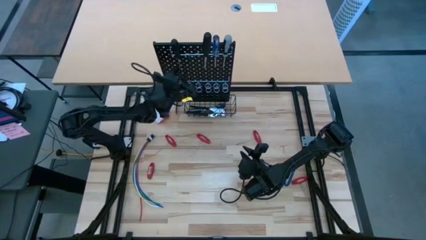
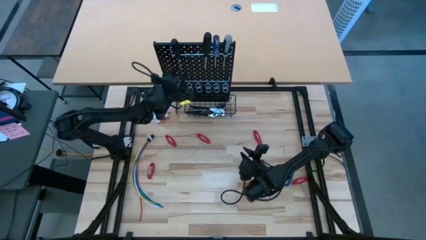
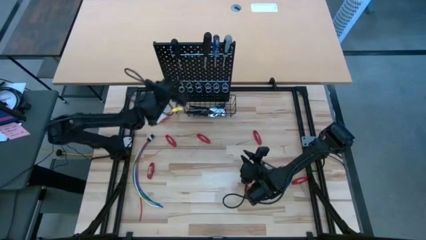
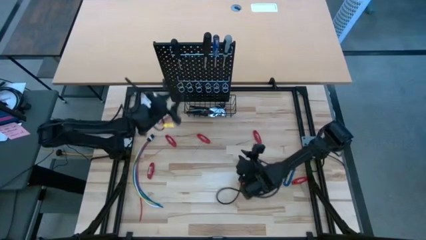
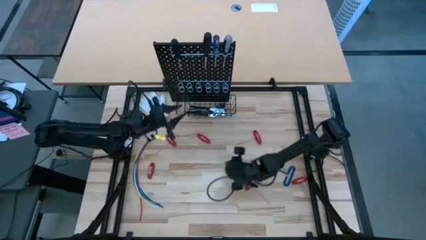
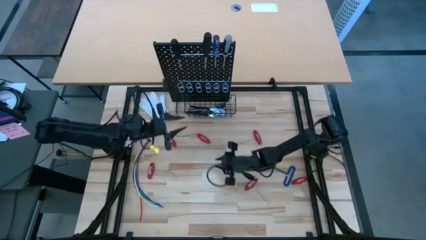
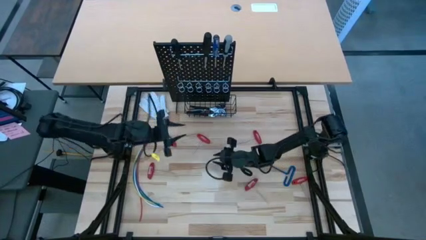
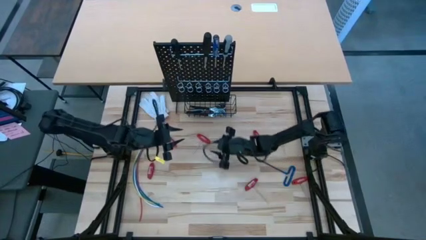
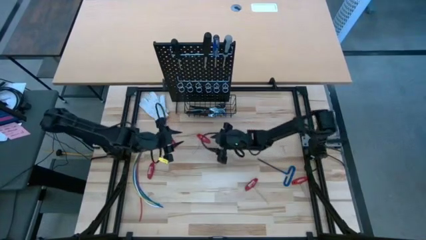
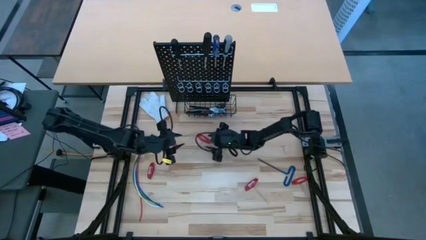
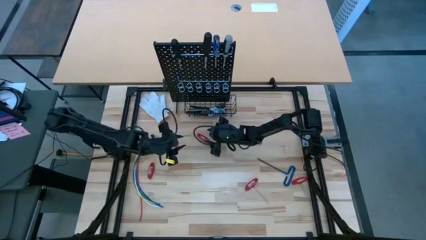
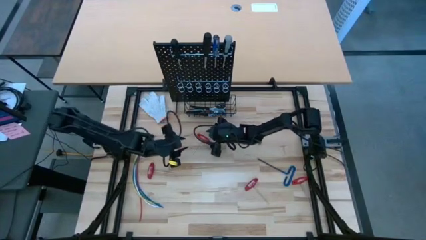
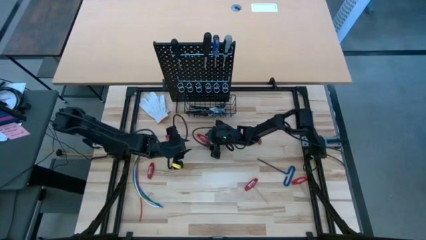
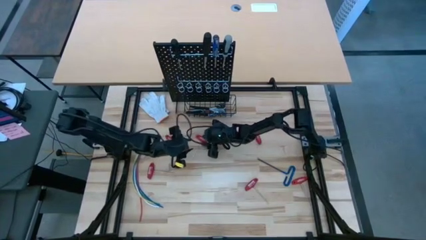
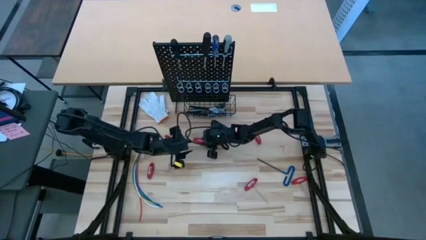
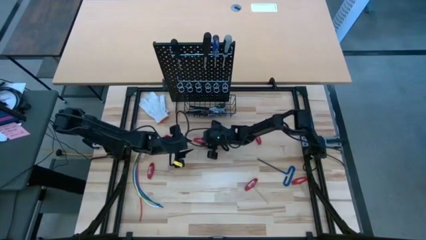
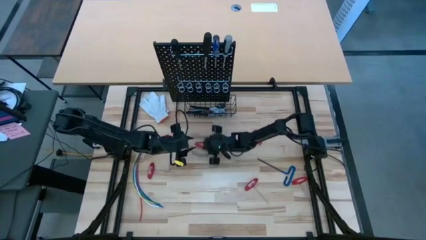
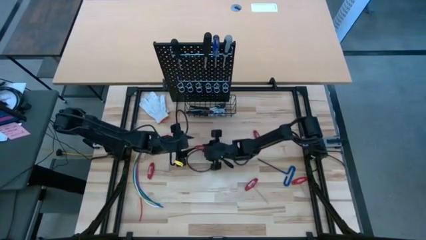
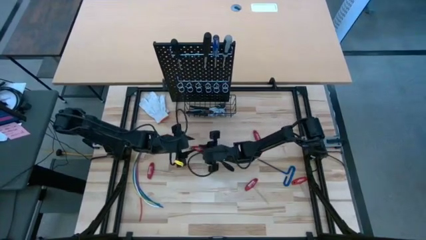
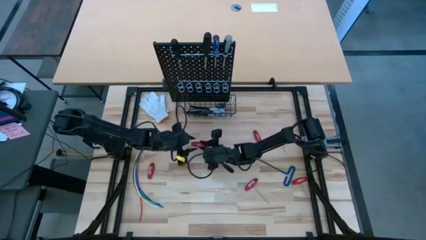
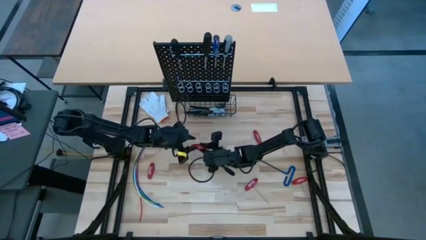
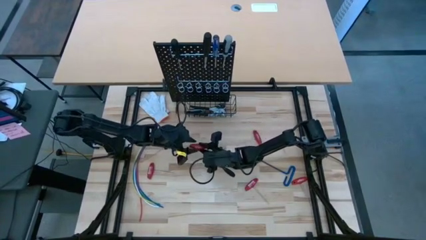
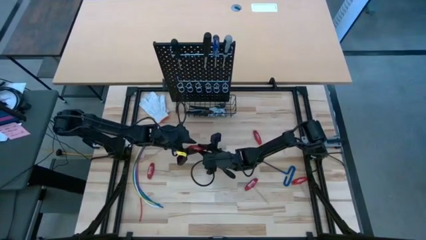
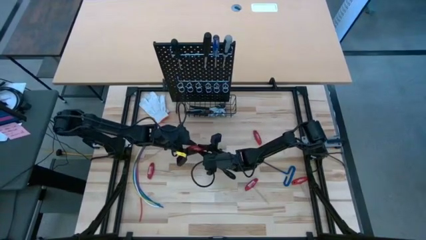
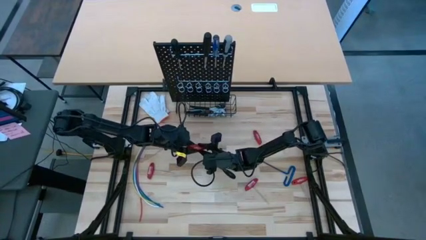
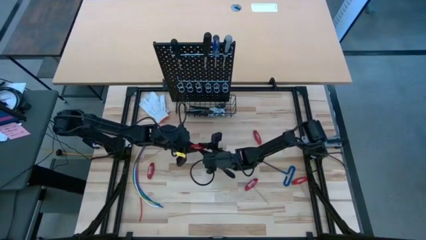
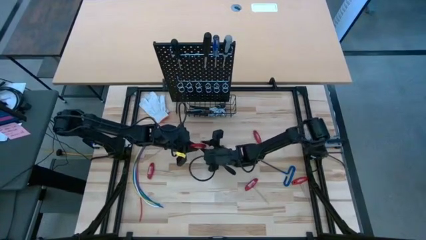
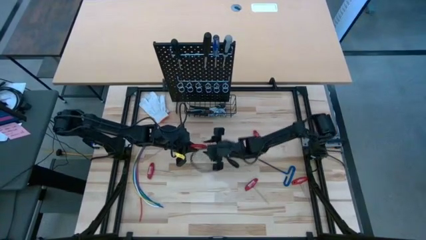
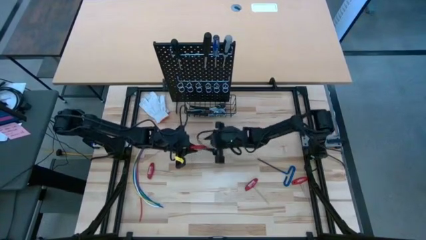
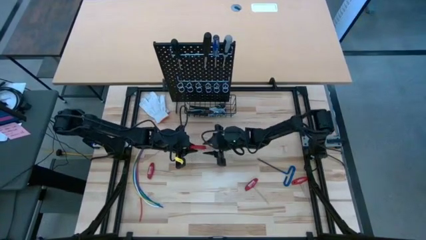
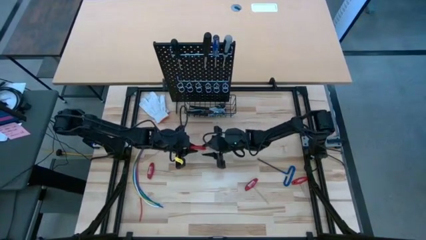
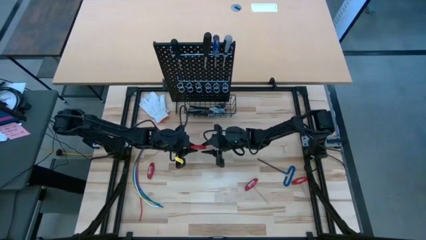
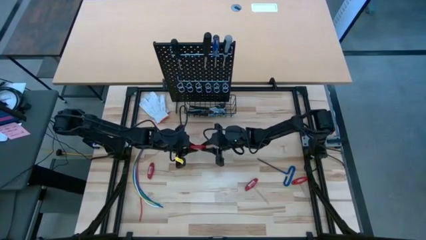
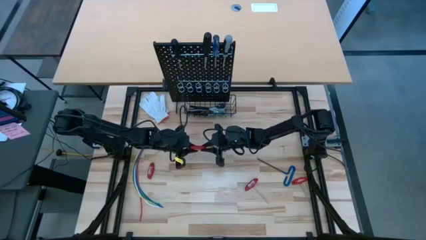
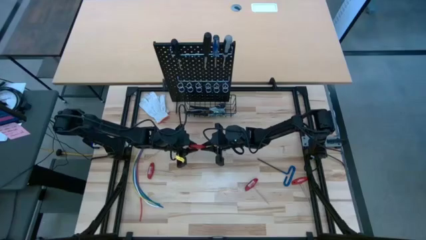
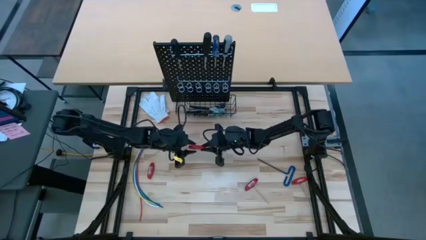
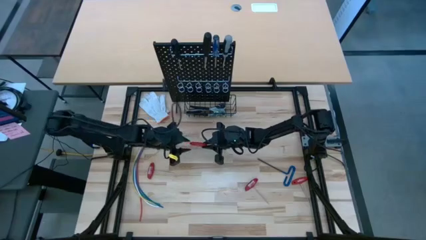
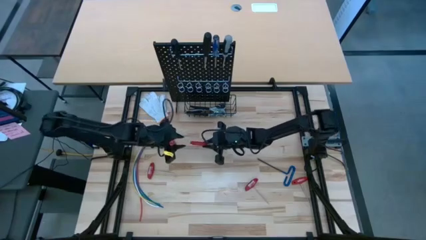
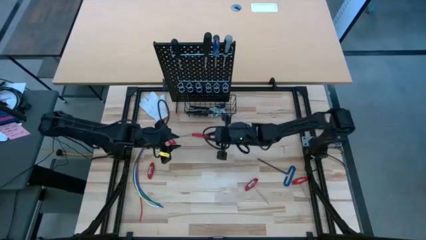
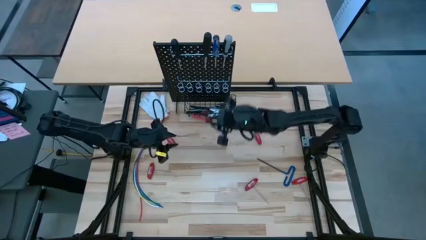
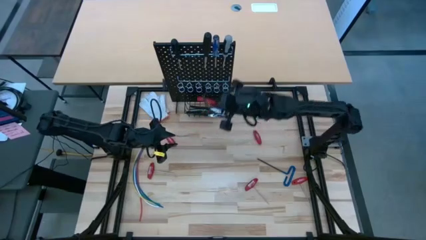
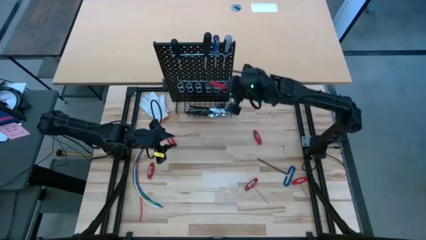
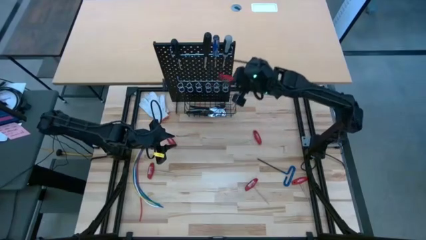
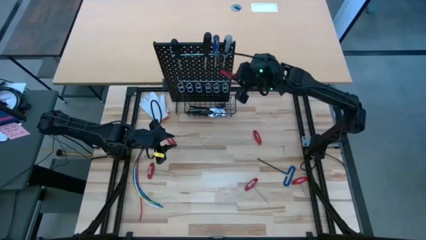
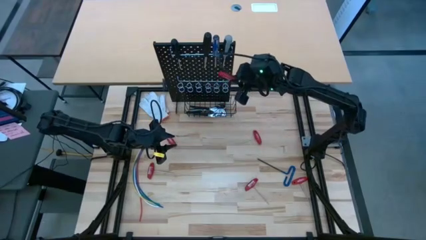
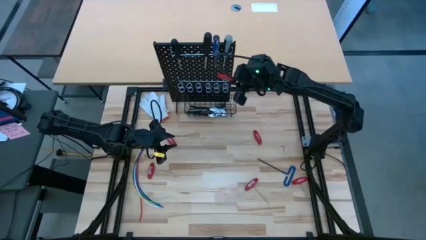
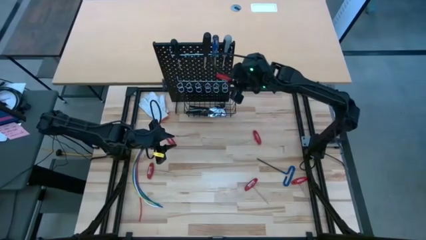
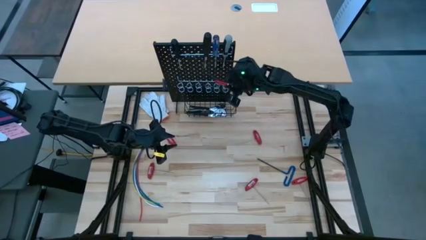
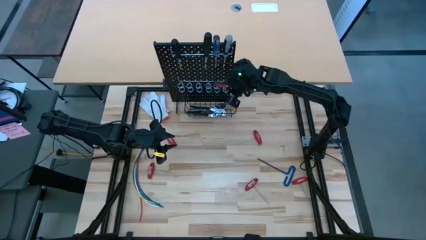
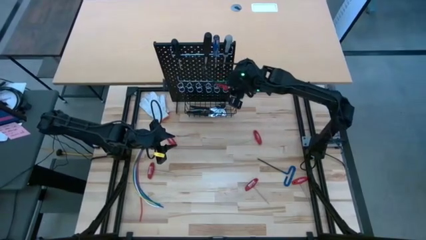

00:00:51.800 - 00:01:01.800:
Task: Hang tools onto peg board
Hang the red allen wrench on the black pegboard

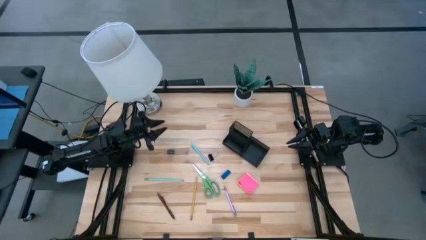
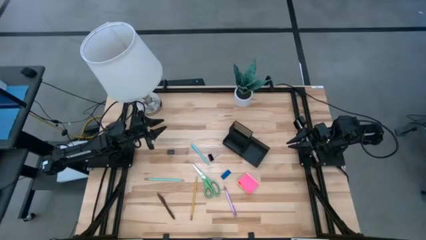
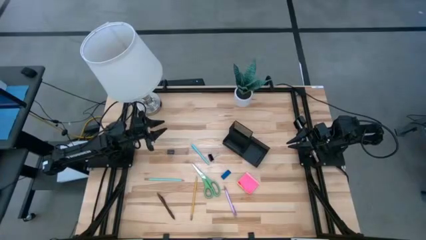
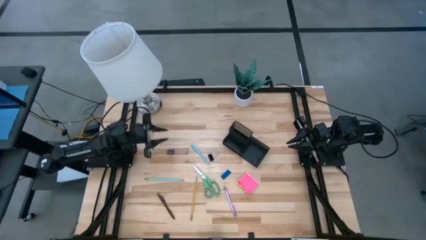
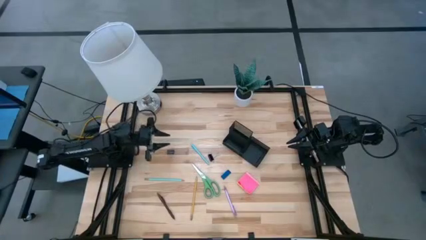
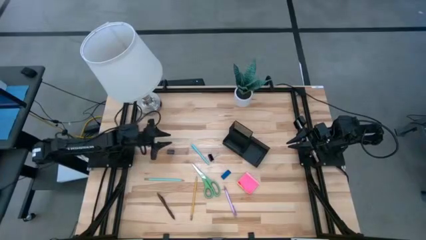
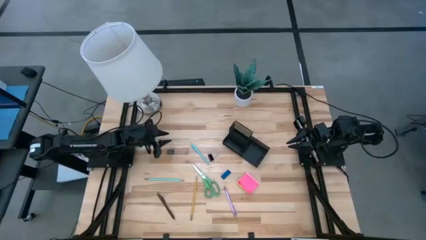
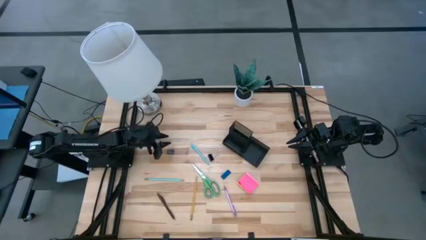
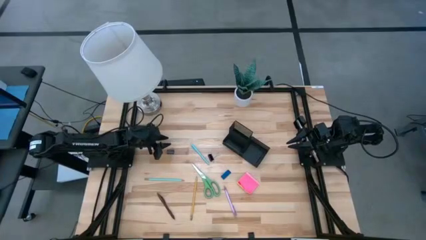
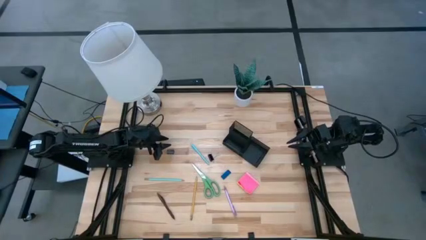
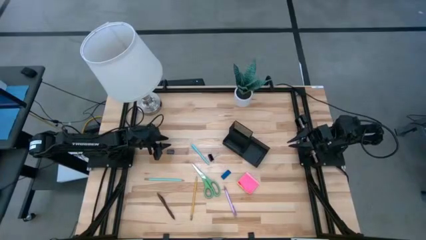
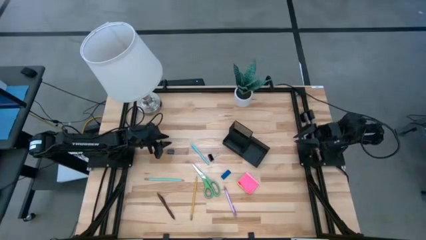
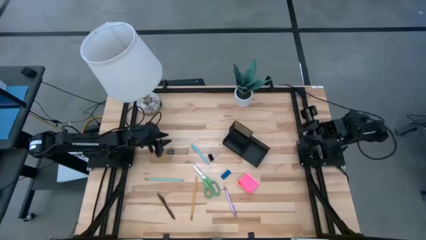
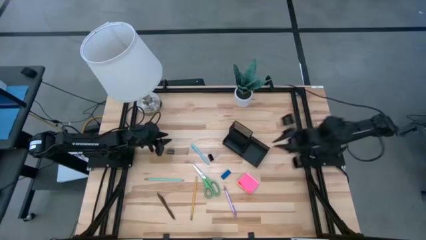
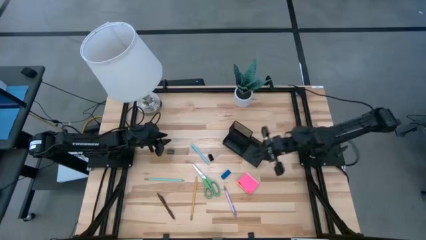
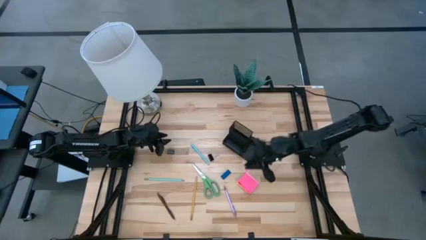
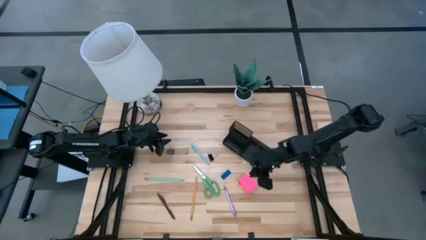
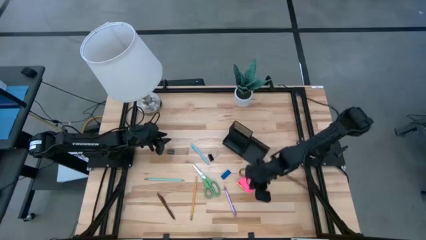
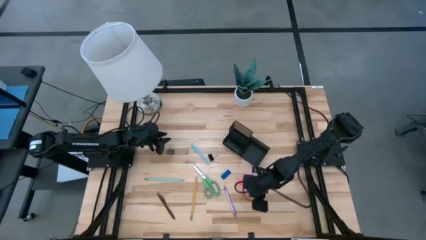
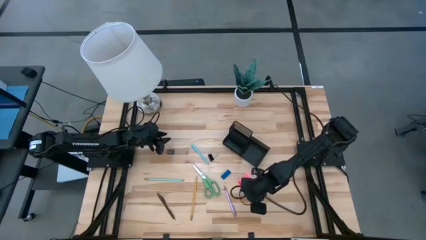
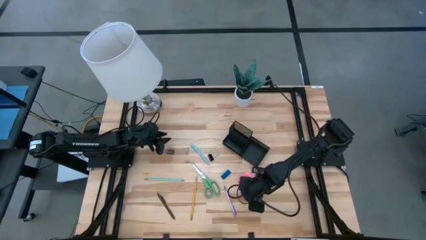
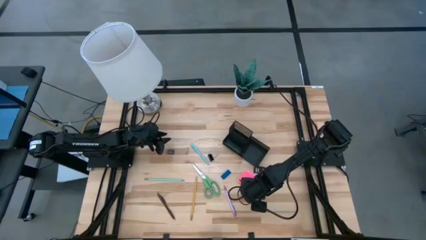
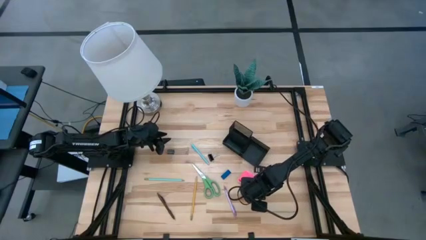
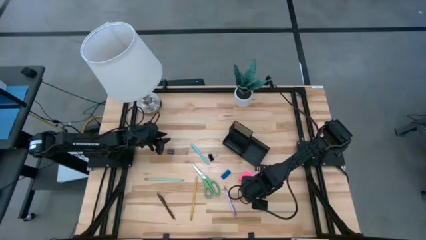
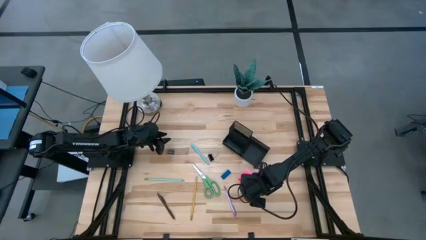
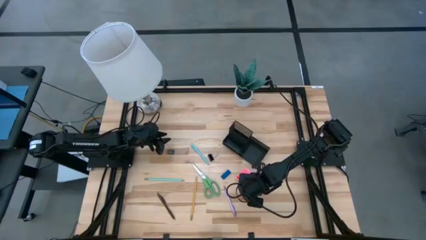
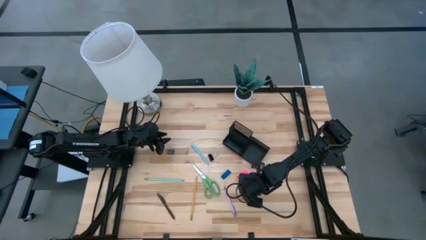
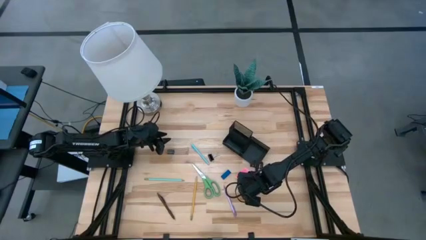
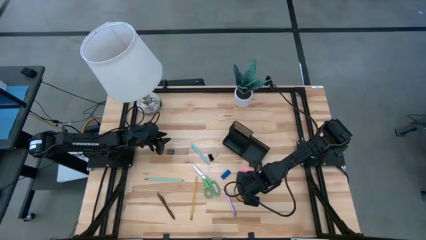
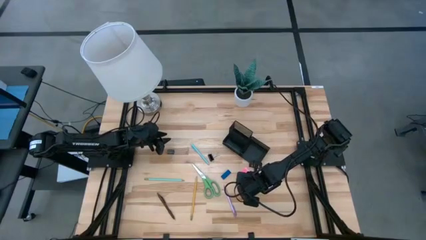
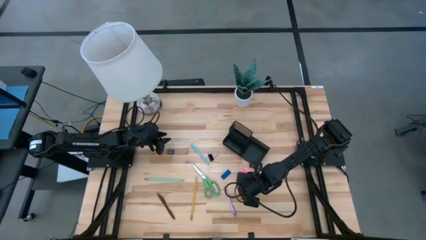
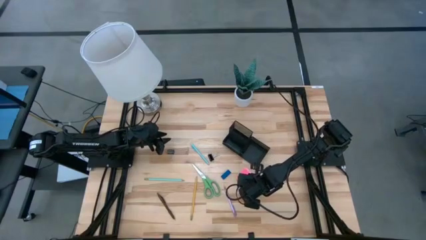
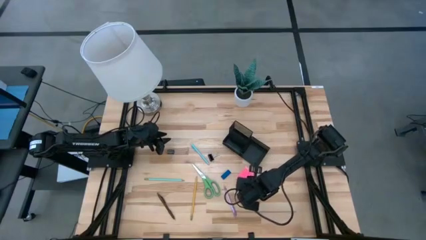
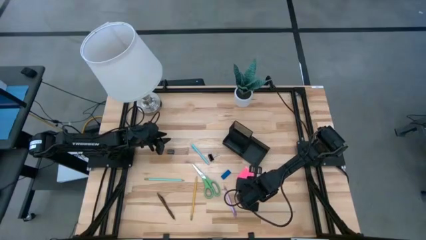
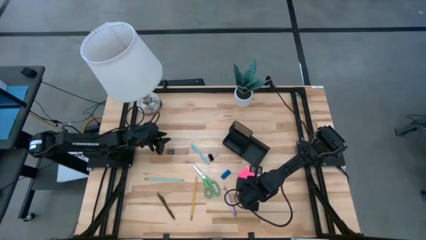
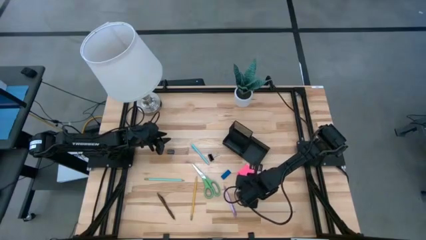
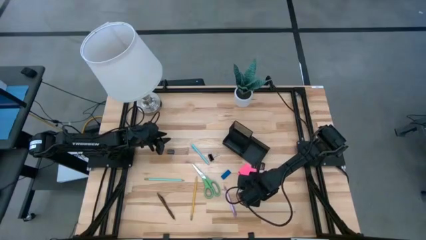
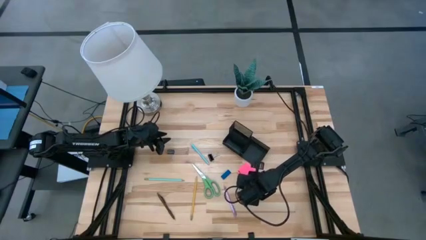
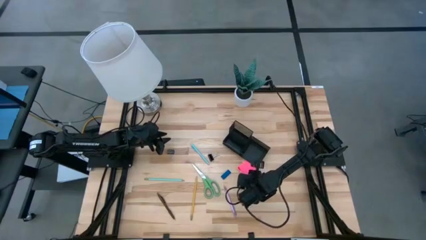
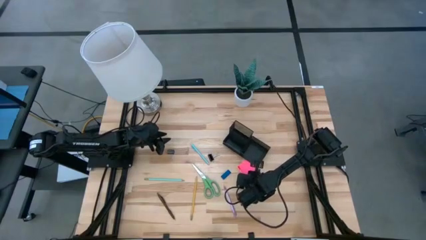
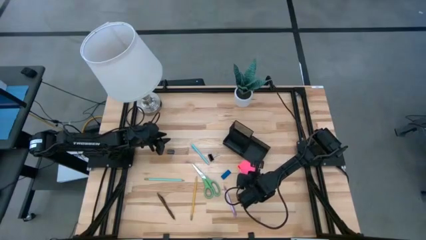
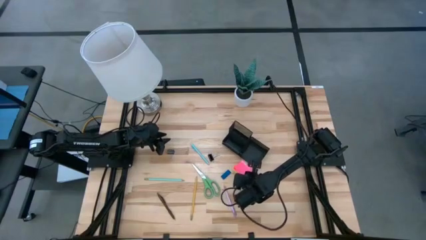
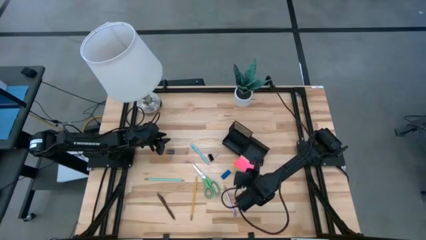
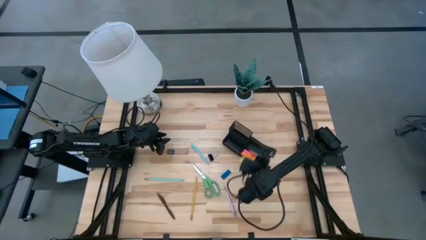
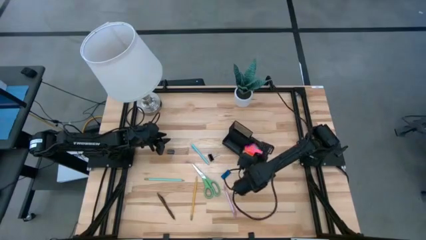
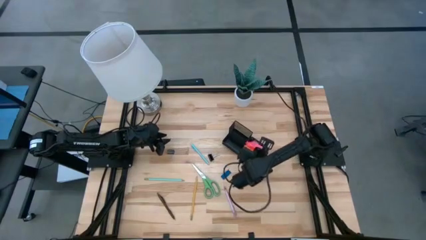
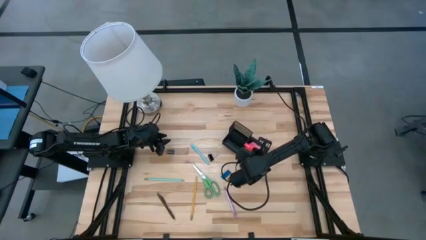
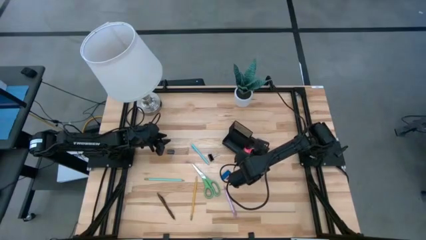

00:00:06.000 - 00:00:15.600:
Task: Pick and place office supplies into organizer
Put the colored sticky notes into the desk organizer
